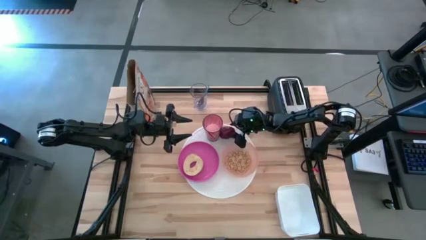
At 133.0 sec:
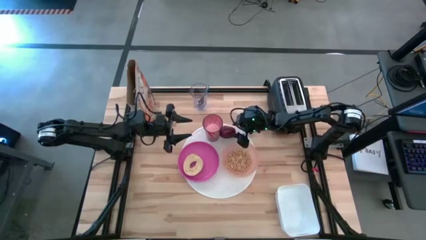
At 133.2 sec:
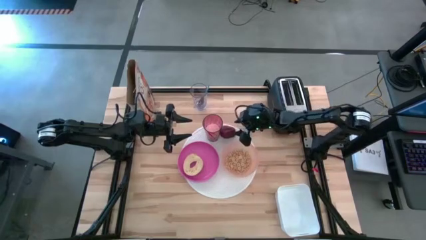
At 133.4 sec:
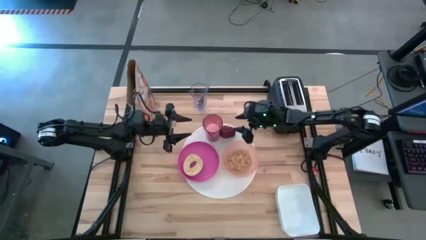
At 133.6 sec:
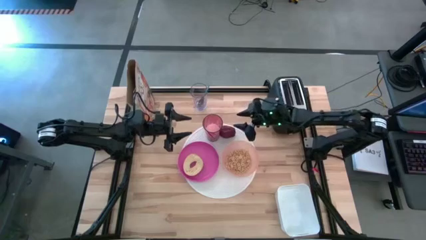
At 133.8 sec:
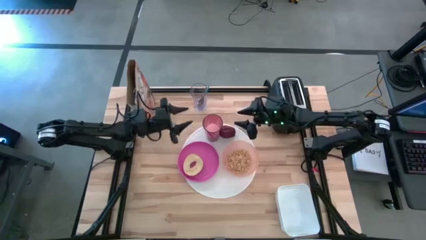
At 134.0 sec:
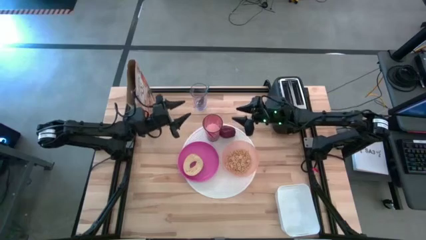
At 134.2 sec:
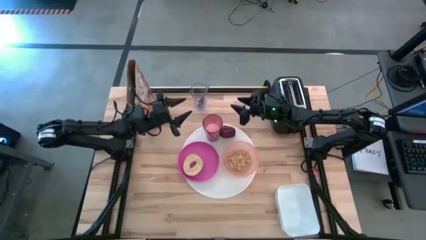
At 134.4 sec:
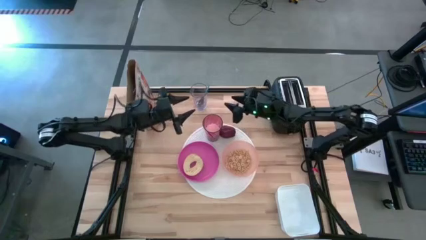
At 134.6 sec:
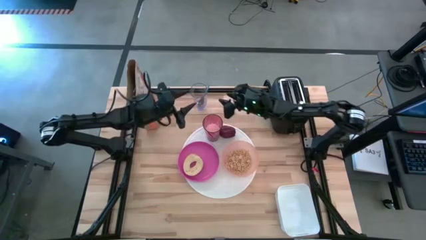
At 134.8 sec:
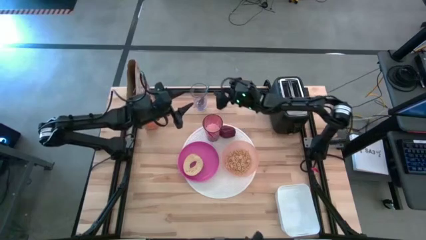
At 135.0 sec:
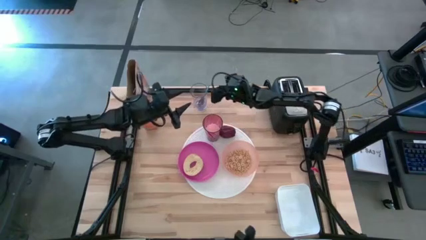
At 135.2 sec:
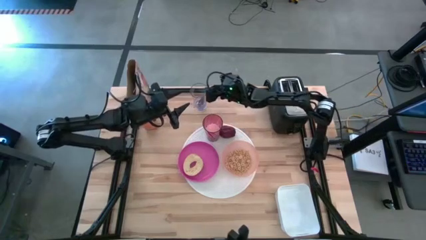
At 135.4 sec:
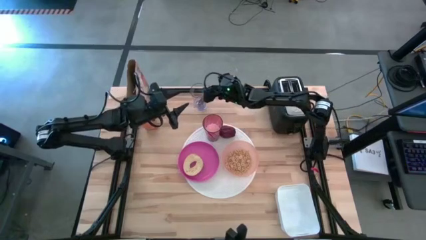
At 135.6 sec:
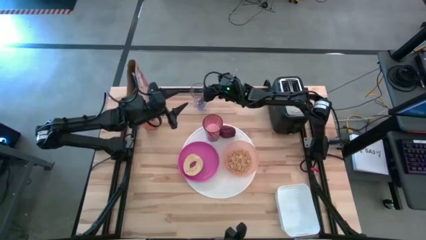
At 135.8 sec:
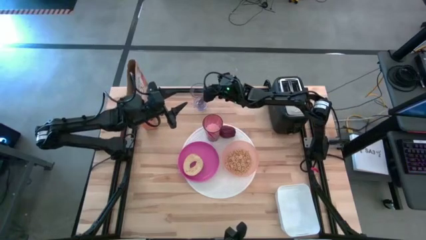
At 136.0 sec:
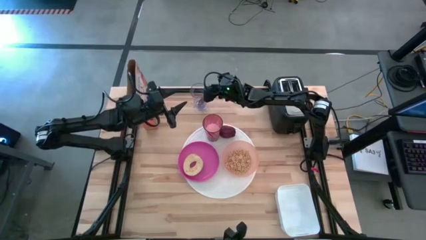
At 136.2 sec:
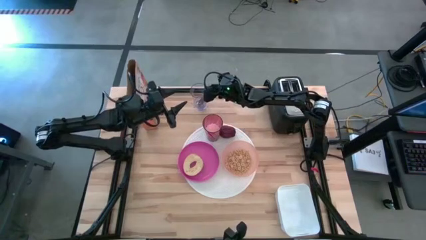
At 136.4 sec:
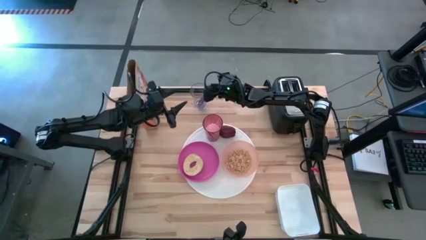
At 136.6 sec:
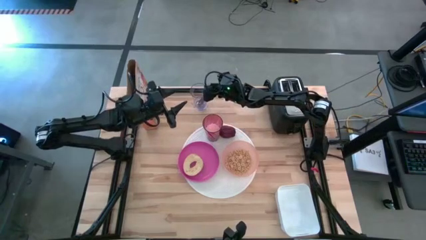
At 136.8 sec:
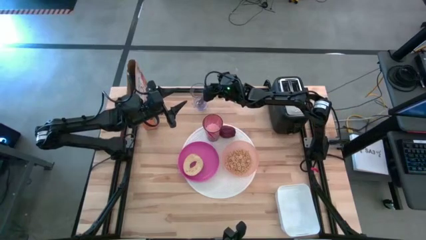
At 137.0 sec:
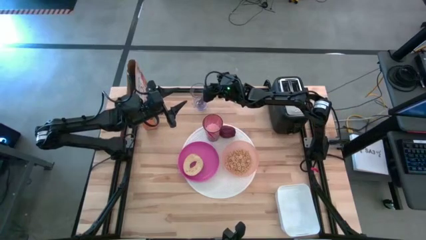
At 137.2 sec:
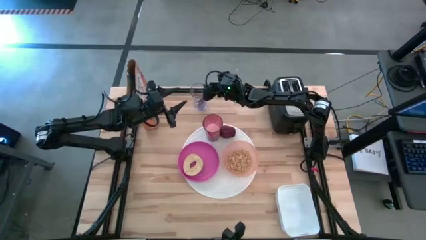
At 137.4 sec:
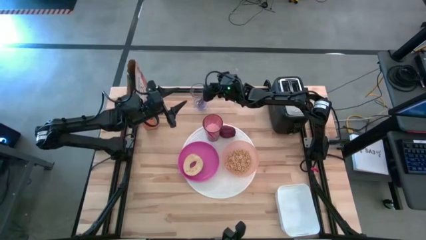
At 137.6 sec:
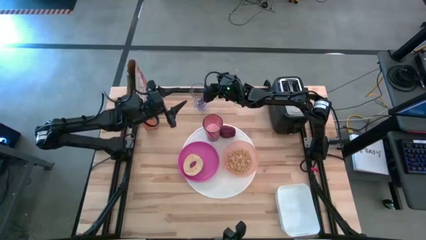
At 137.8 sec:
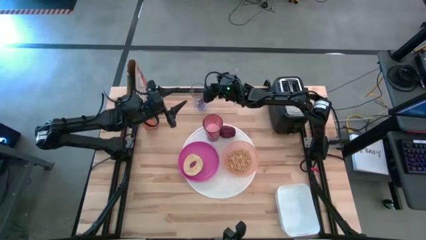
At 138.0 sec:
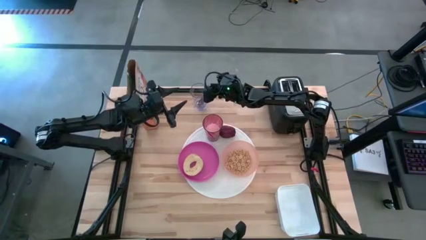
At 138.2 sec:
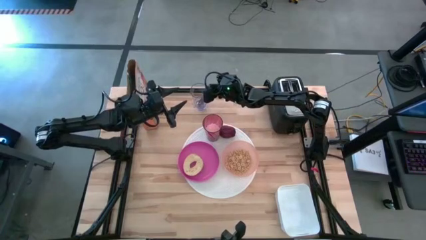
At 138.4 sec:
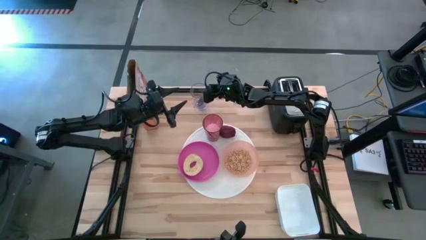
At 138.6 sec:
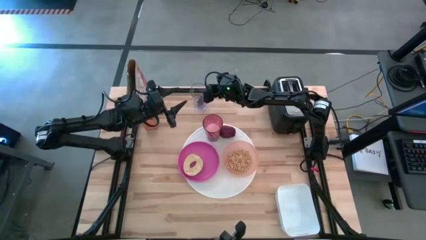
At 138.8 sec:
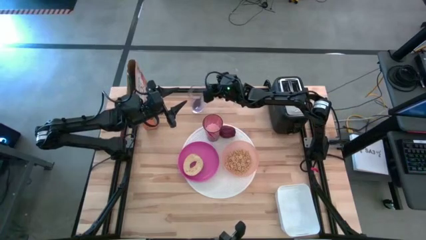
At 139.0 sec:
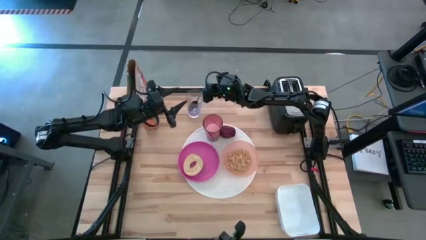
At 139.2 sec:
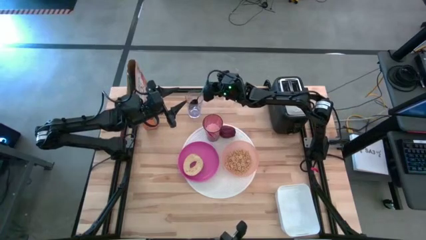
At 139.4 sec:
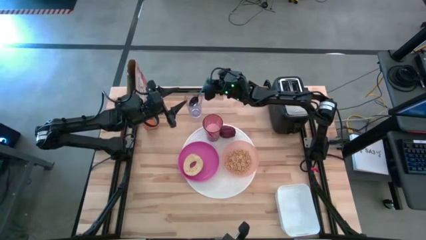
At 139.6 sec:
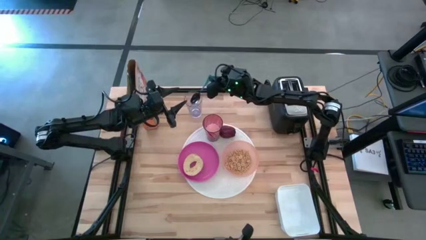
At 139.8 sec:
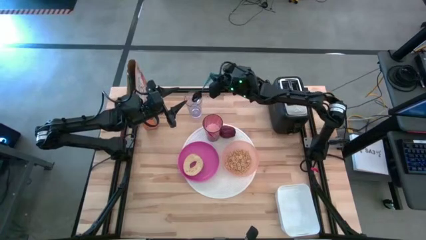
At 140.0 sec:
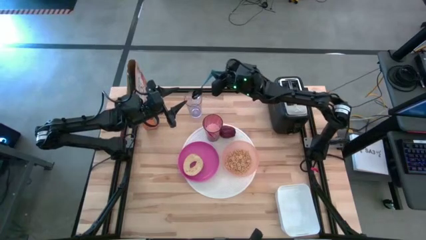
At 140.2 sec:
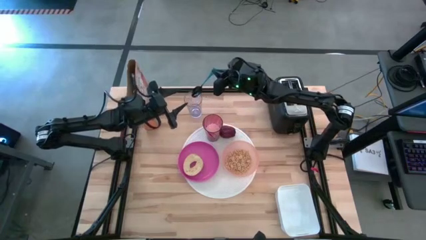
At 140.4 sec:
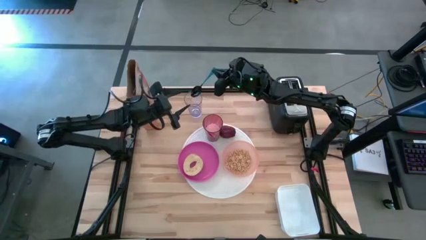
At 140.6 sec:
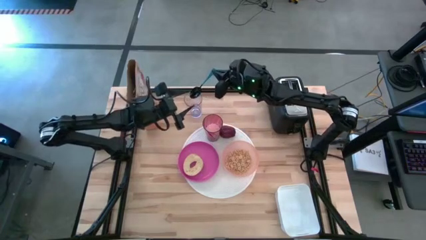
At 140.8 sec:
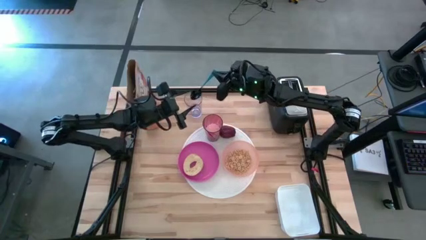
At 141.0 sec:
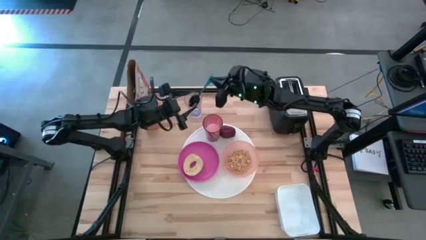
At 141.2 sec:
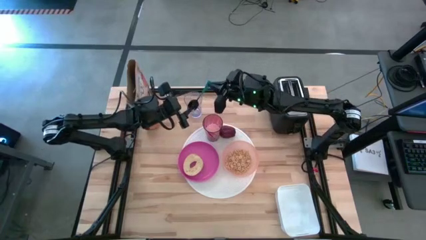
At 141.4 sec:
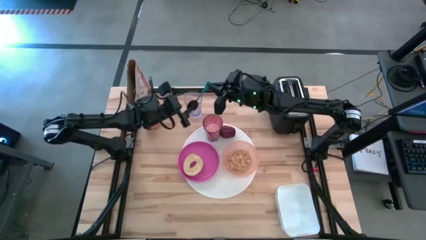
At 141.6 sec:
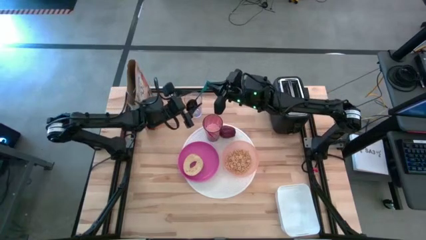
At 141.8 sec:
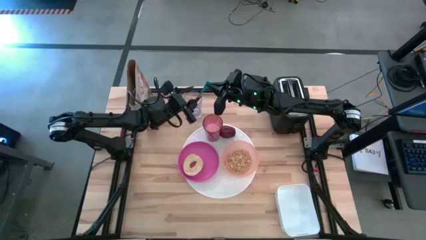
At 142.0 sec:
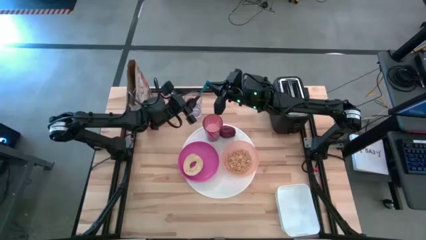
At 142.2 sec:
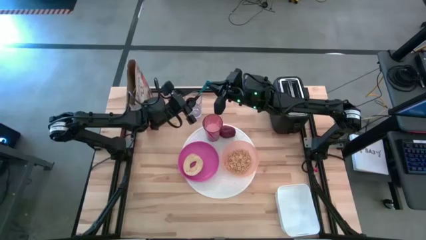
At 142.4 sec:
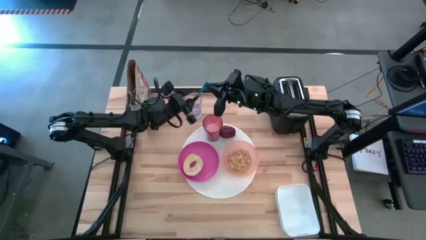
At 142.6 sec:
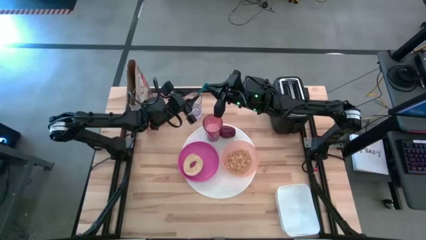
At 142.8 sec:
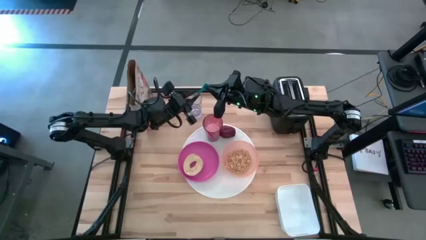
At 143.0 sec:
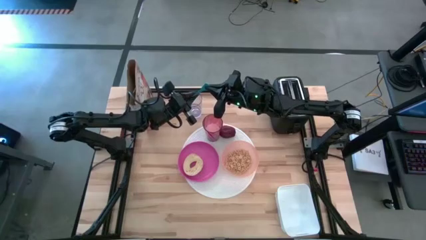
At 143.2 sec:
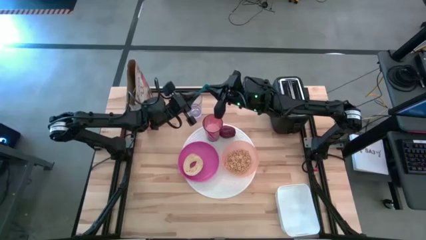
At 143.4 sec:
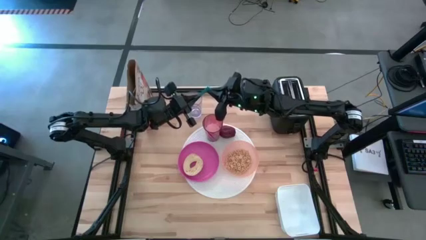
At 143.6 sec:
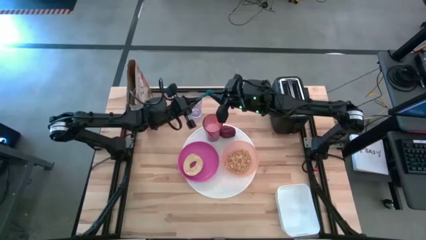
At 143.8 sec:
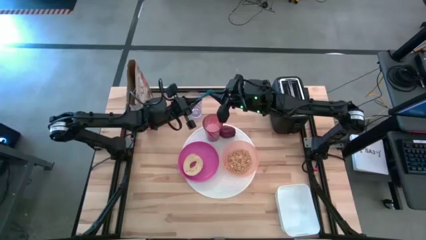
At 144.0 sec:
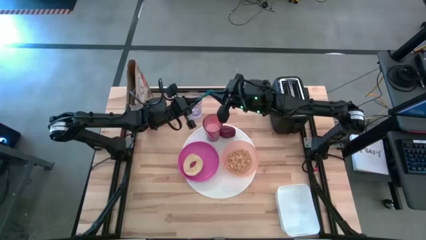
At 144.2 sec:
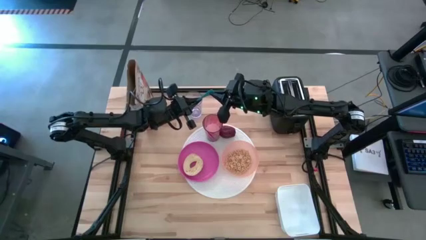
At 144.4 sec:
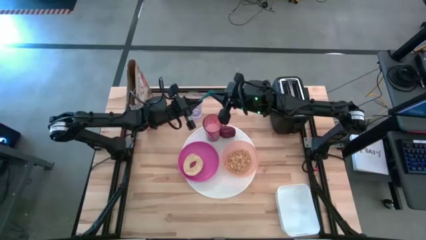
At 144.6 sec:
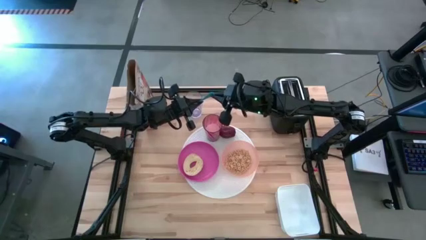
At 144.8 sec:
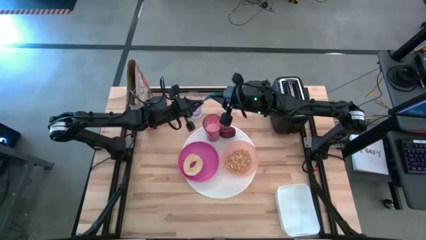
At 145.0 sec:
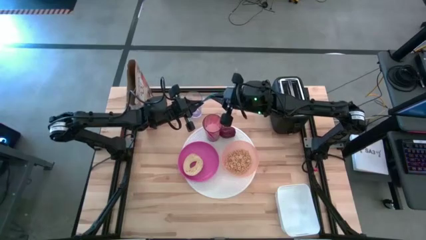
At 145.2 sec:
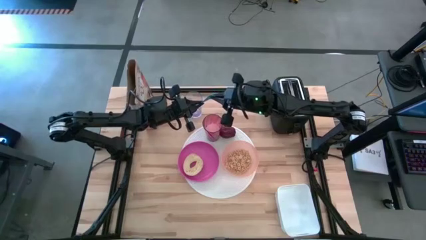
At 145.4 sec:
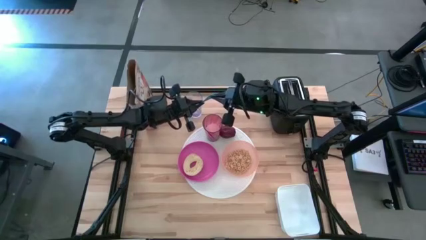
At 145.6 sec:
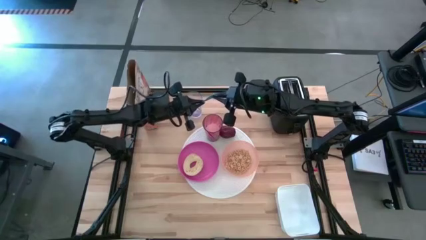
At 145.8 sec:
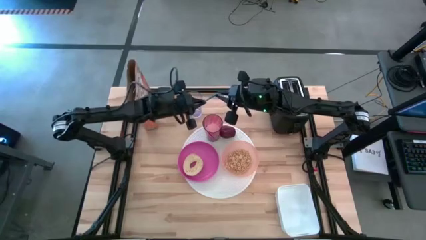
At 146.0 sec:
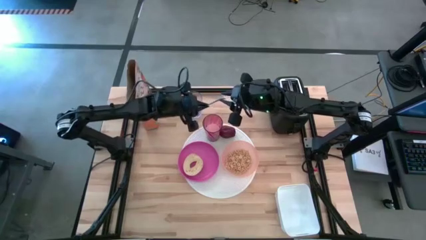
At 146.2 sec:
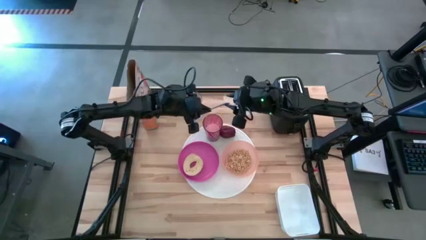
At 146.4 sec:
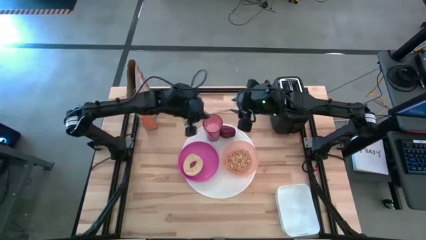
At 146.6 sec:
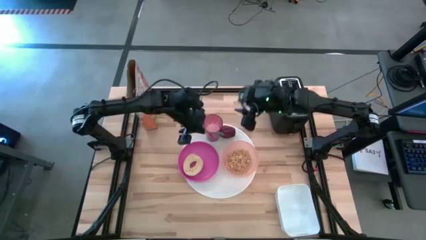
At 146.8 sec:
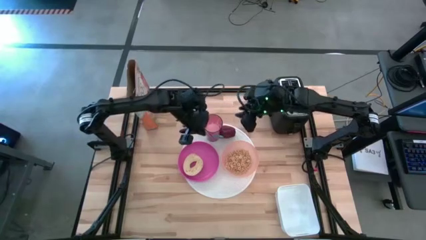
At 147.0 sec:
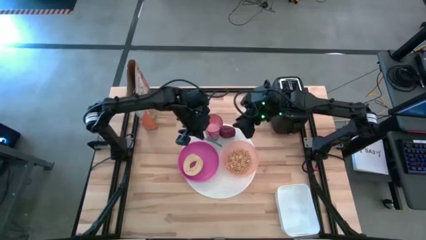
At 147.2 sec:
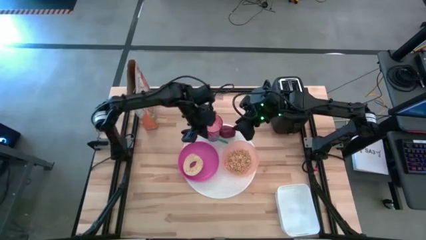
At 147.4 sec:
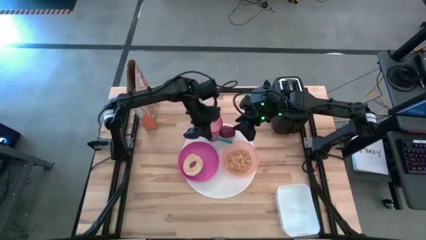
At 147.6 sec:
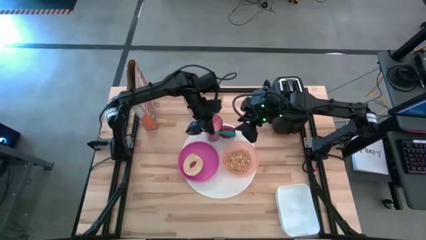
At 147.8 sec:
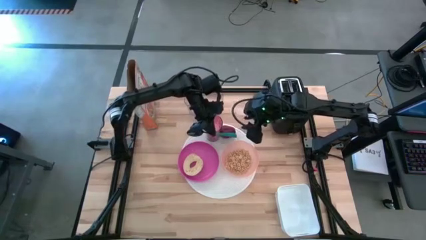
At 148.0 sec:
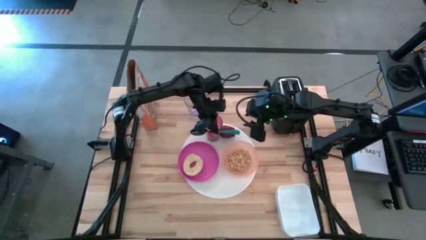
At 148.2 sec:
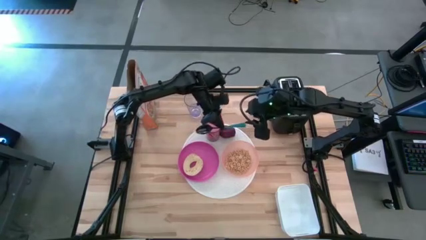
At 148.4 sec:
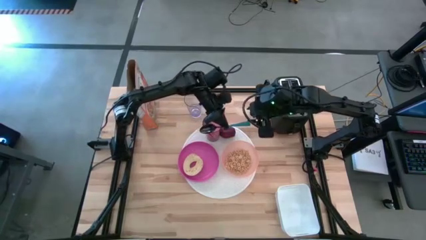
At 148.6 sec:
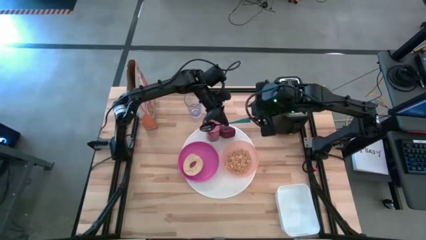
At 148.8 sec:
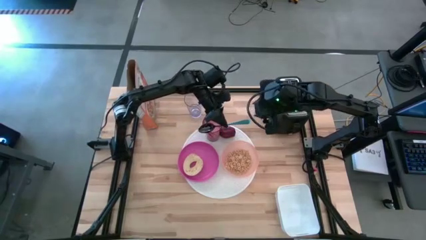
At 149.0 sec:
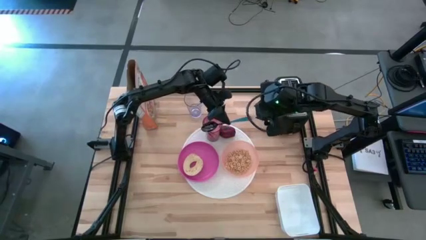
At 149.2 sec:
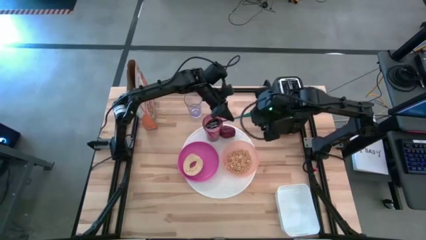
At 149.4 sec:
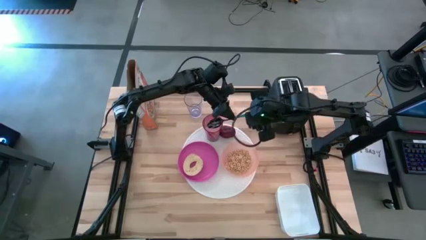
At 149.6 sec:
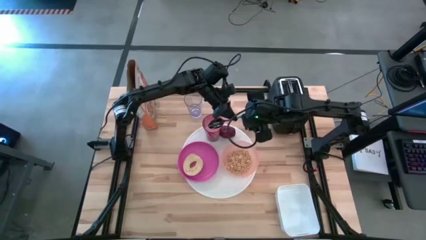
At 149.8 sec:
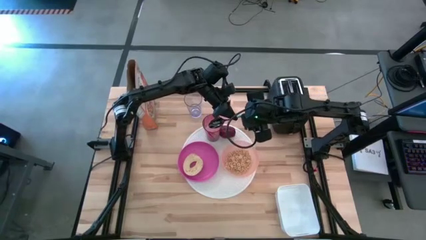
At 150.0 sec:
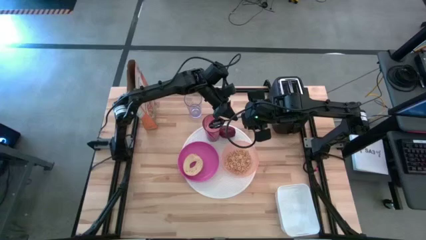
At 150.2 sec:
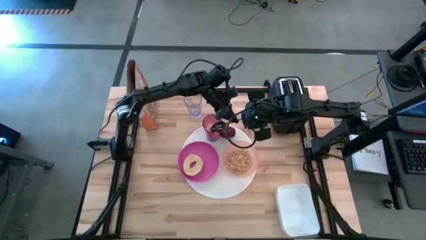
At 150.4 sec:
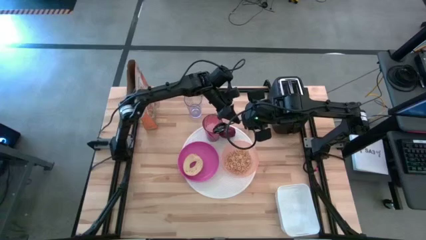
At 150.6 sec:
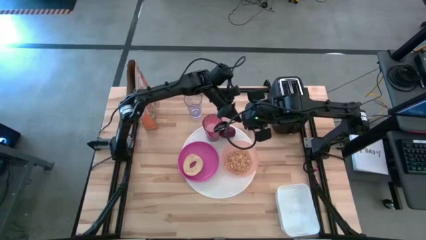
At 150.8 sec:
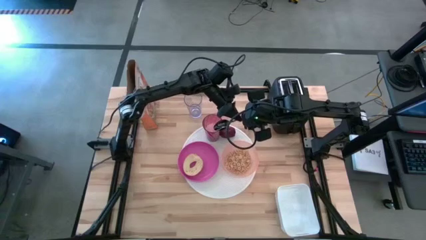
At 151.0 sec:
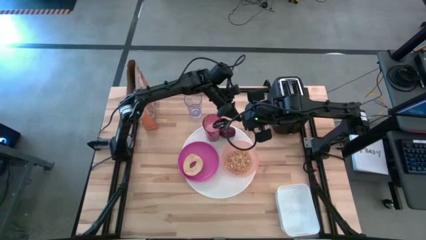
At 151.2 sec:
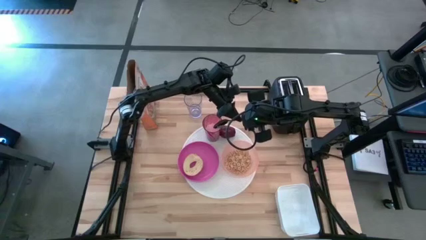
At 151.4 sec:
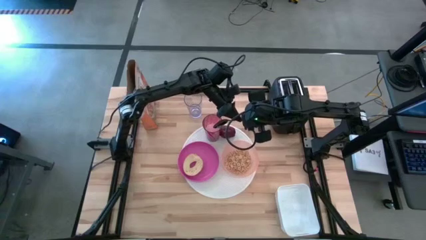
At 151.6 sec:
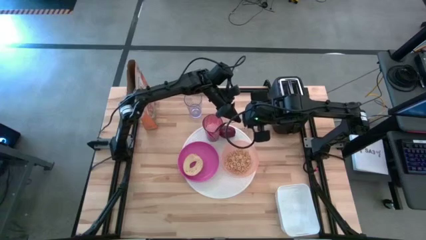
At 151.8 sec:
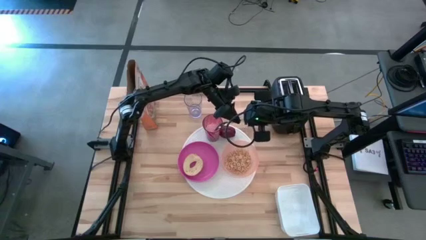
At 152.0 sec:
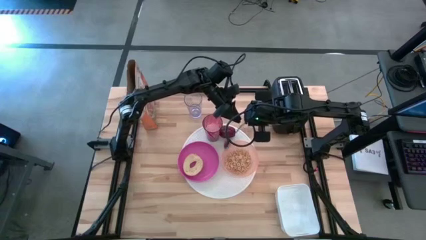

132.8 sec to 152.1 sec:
Task: Arrange a breakfast setting
Put the blue spoon beside the orange bowl
